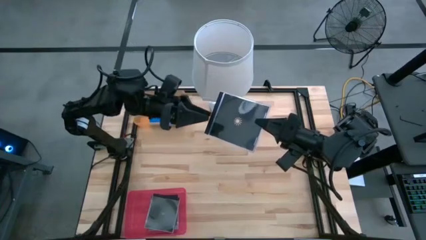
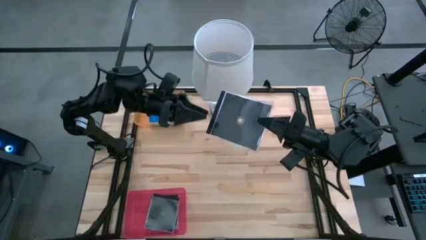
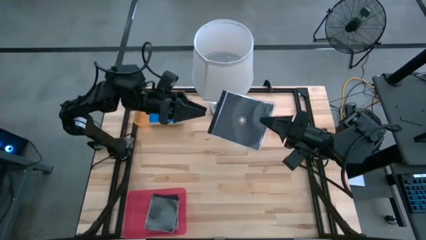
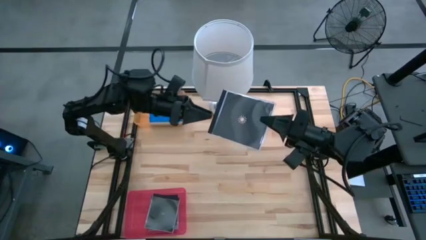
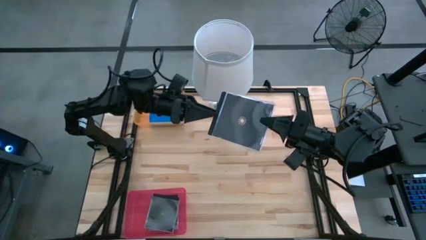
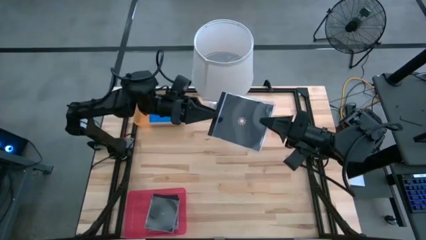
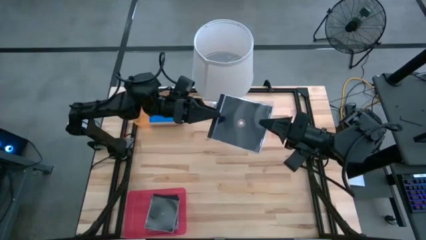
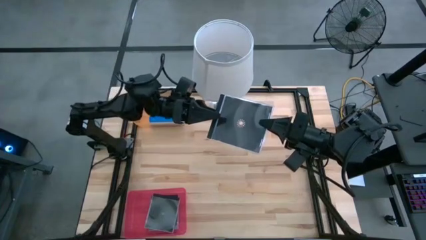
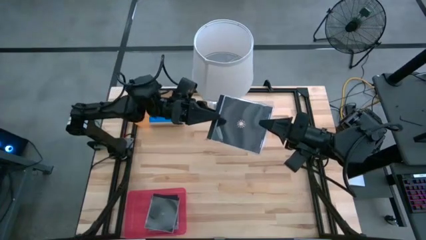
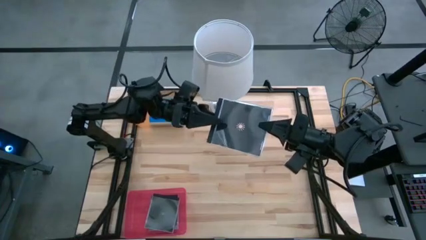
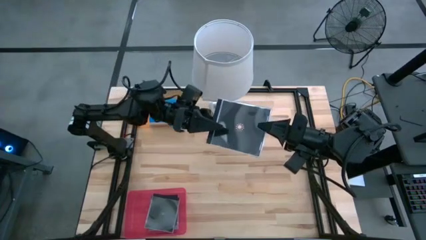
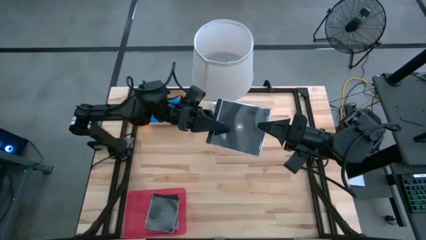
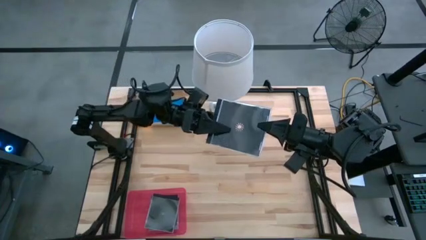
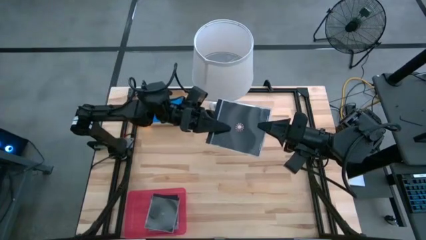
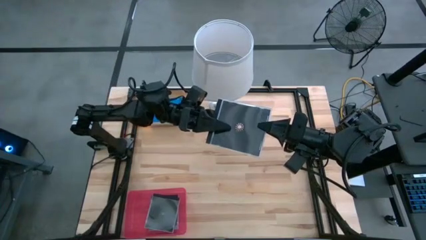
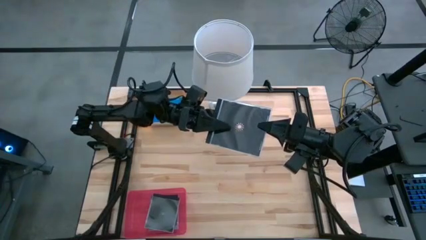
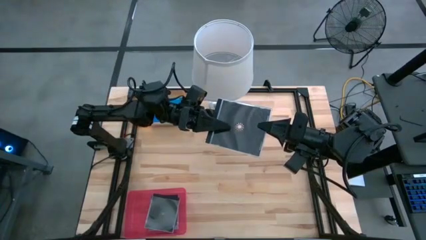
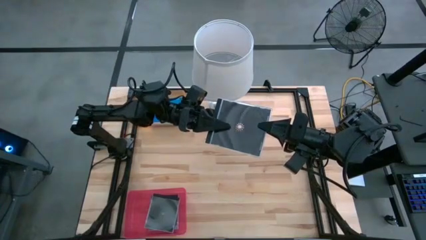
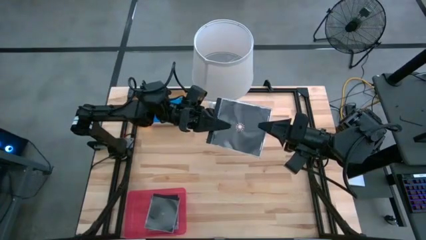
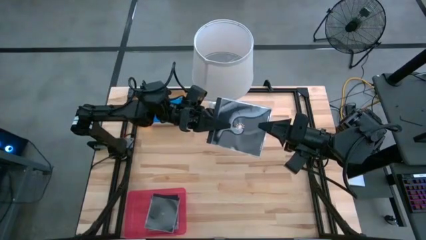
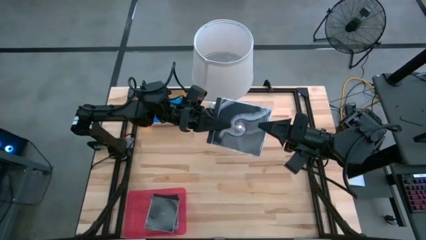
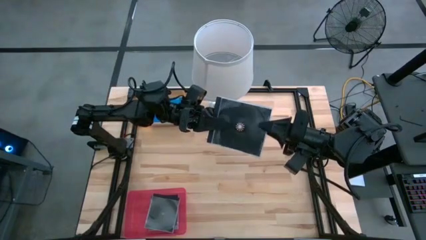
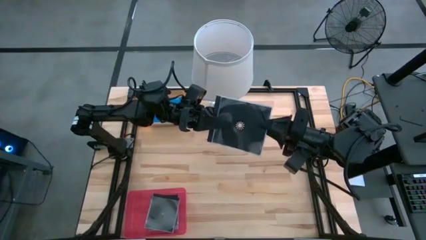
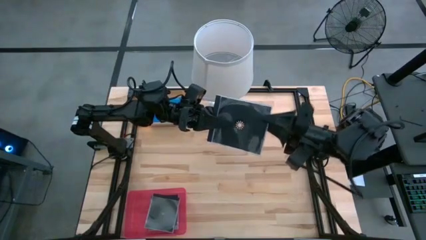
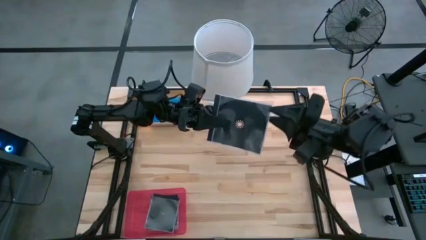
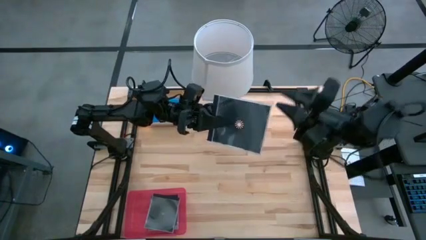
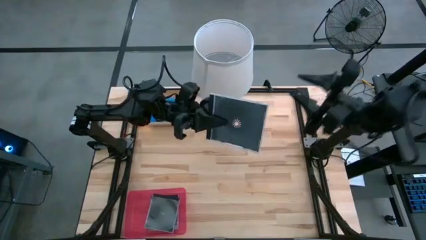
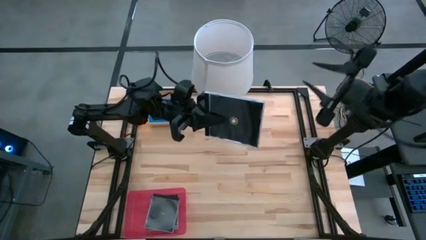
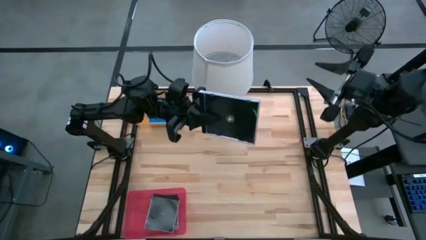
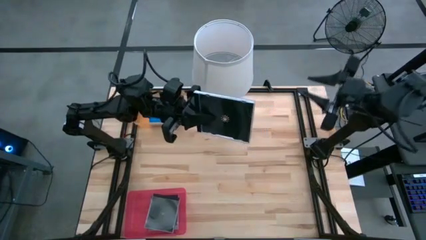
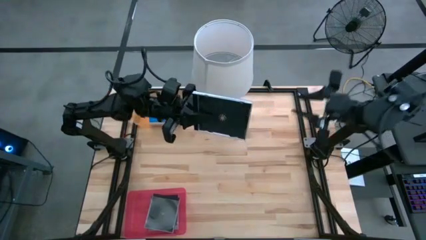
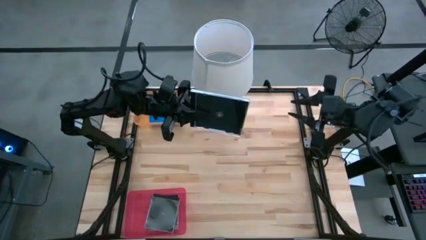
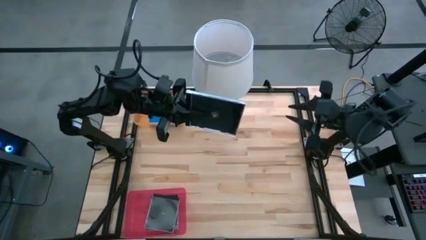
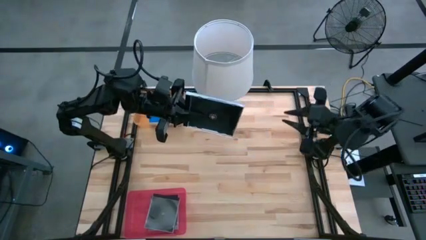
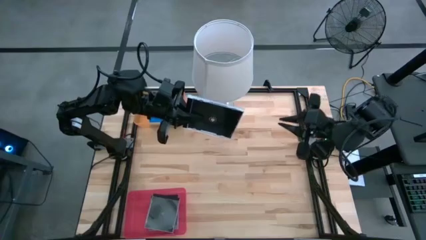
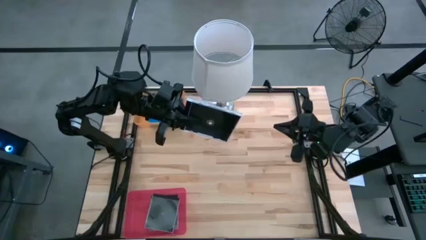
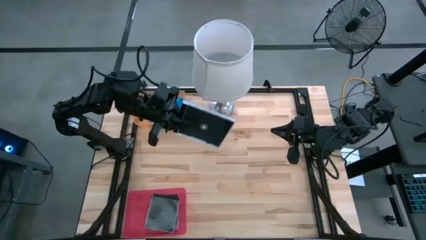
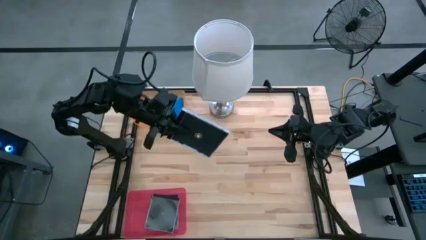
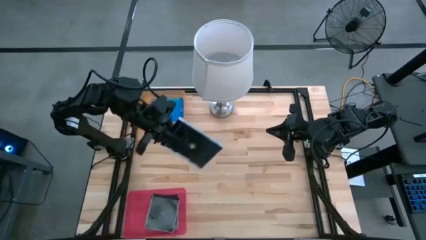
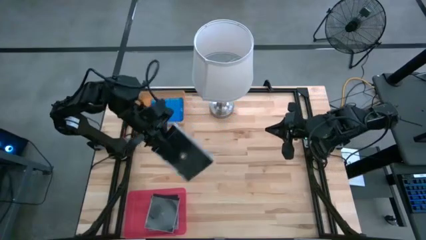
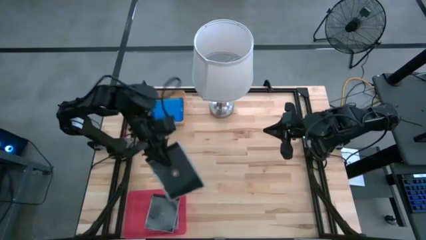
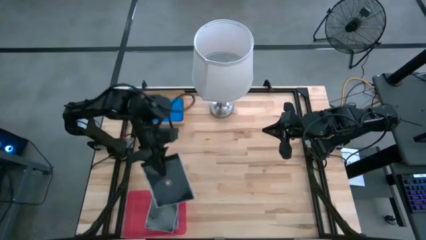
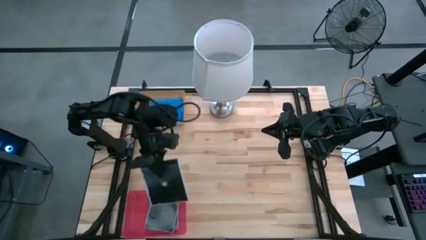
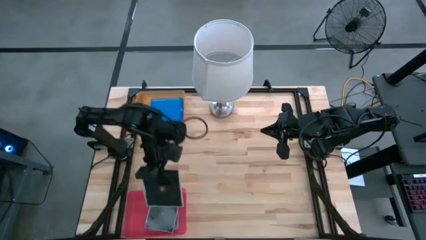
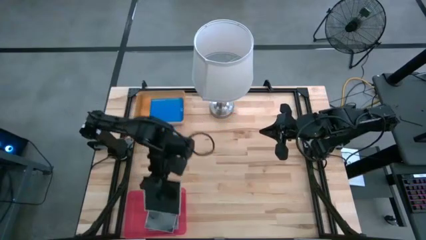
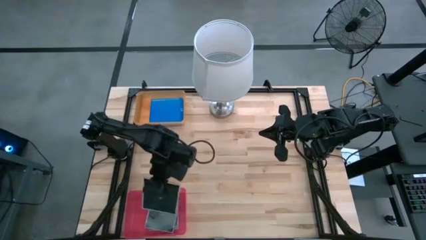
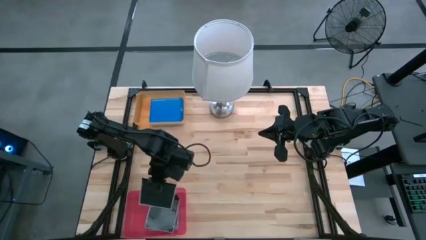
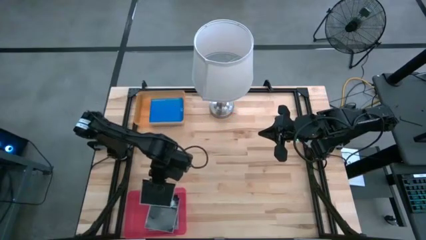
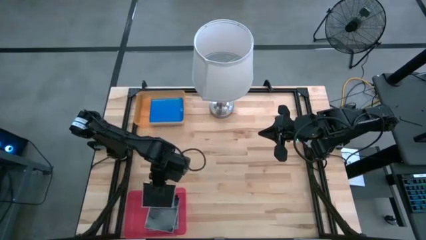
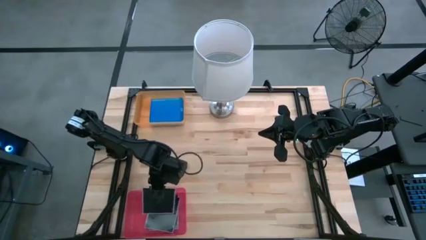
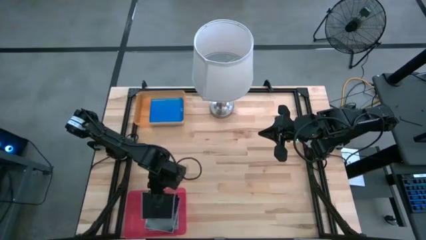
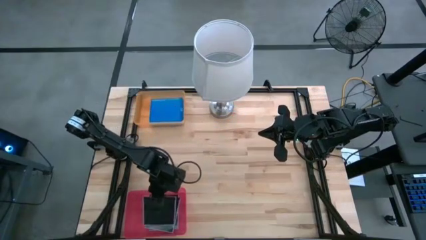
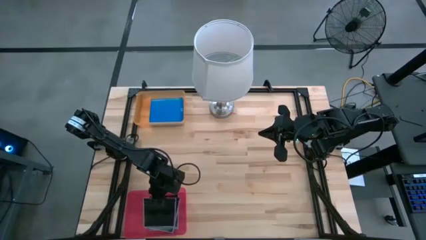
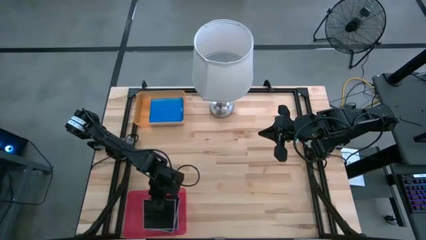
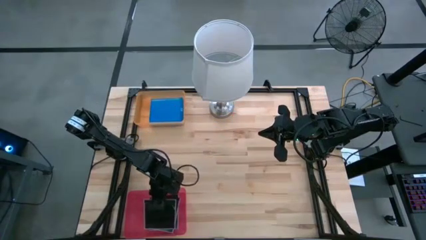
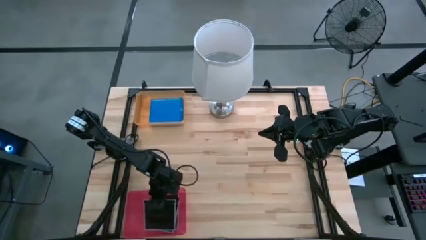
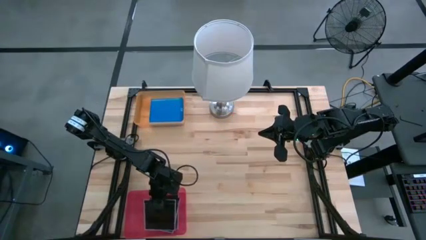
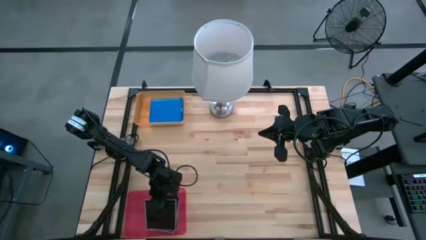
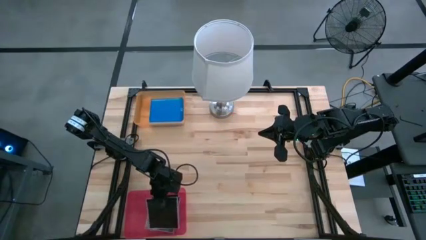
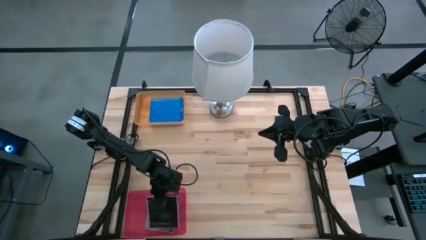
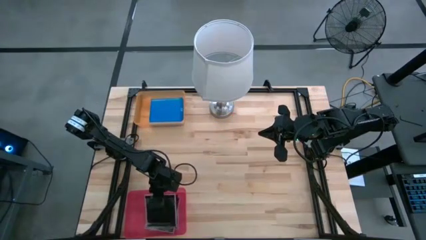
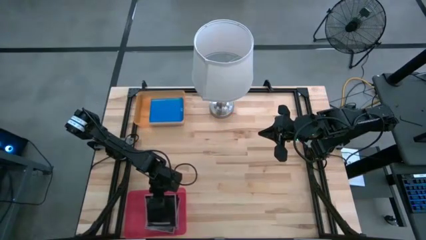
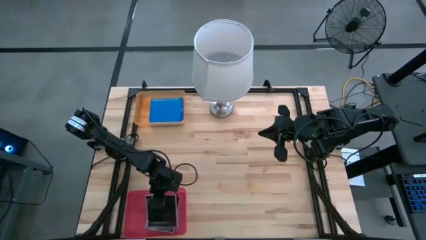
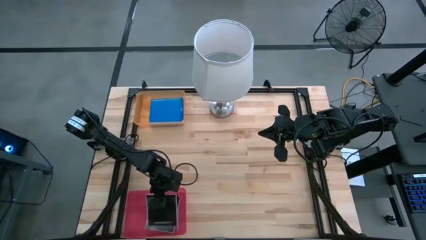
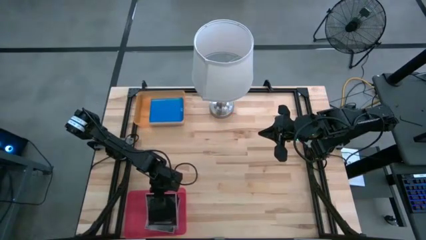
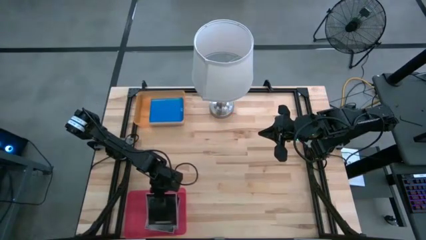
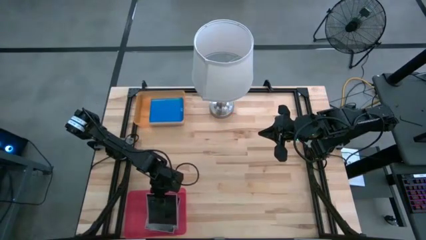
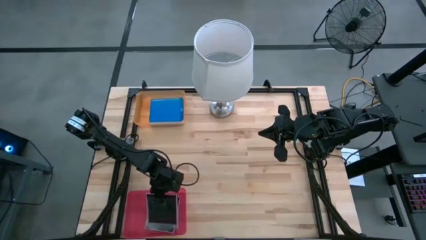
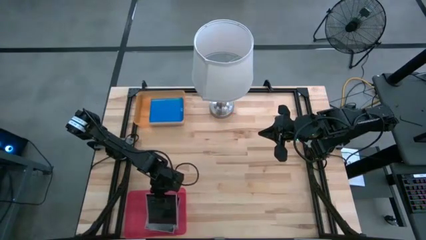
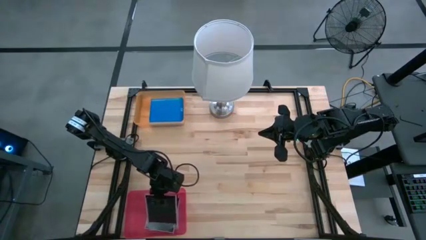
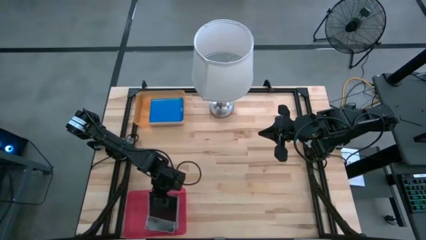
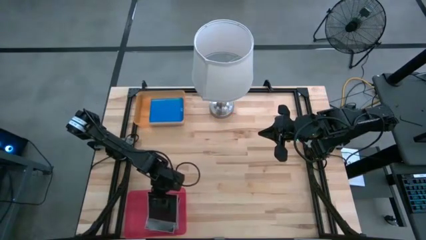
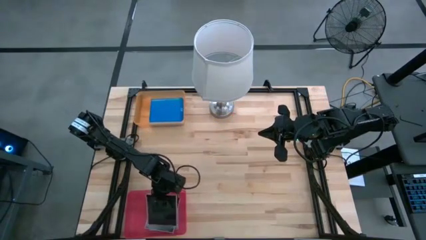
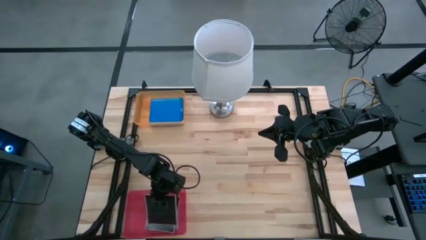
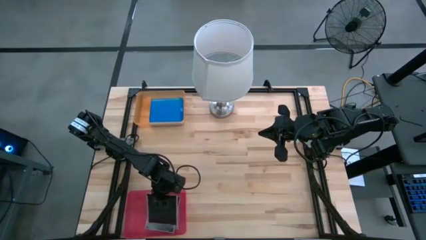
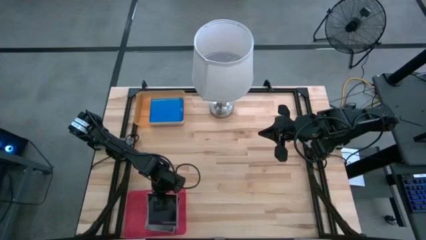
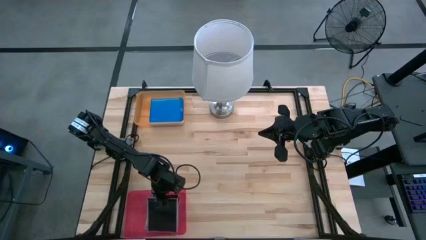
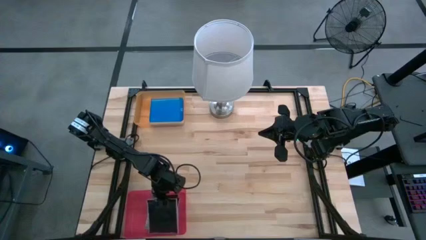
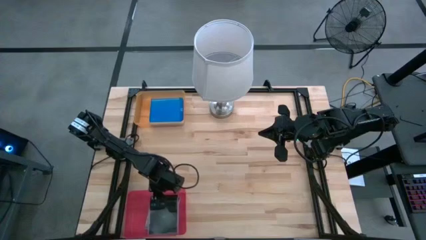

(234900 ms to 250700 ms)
Task: Pick & place jewel cases by type
Put the black cd case into the pink bin
